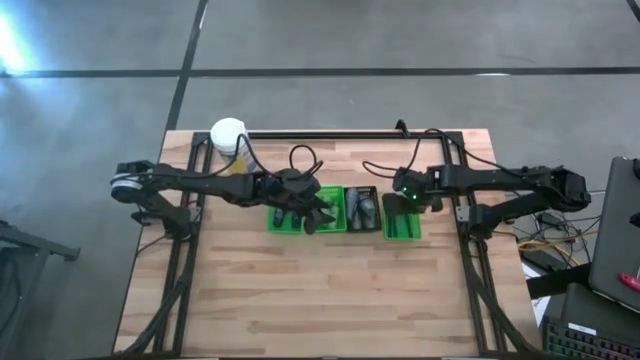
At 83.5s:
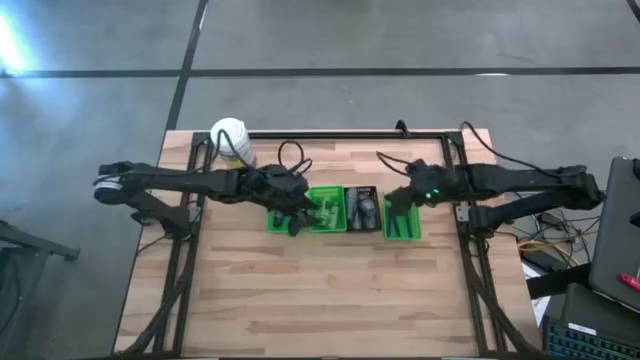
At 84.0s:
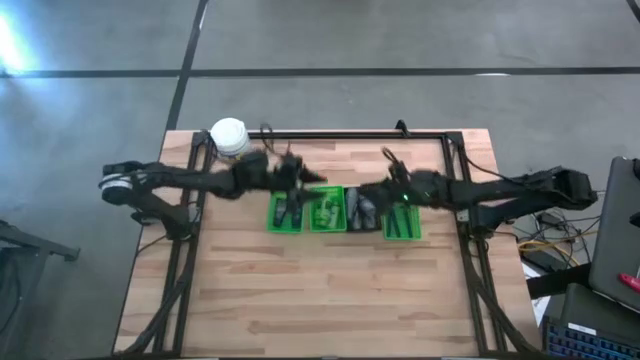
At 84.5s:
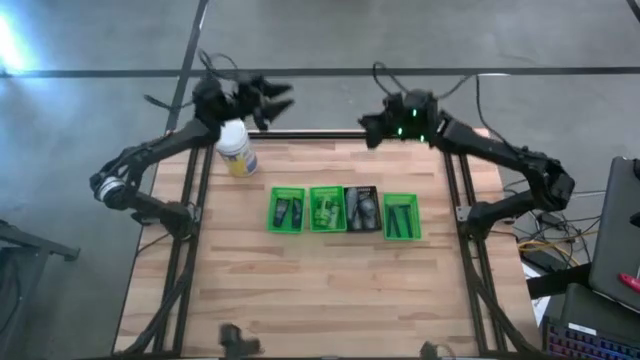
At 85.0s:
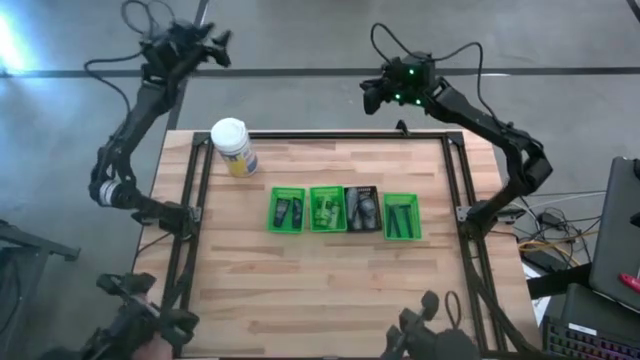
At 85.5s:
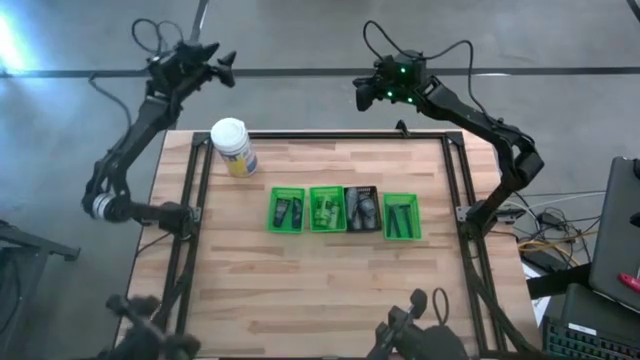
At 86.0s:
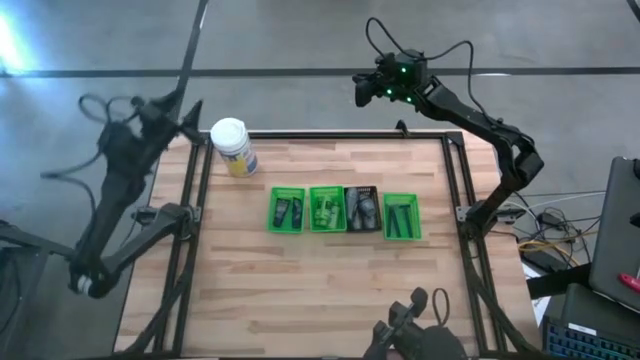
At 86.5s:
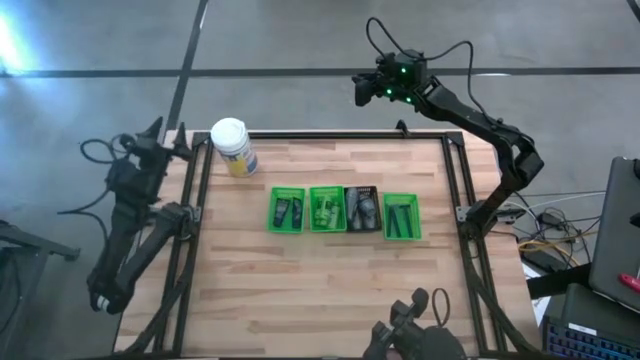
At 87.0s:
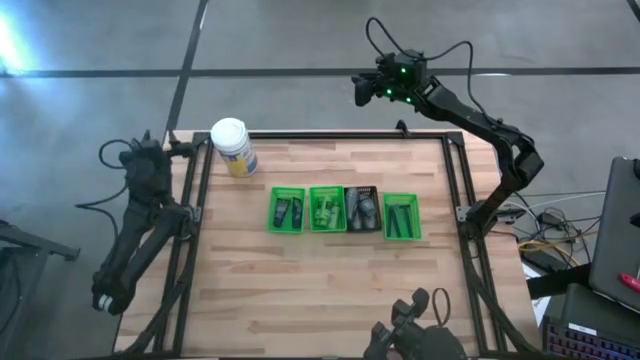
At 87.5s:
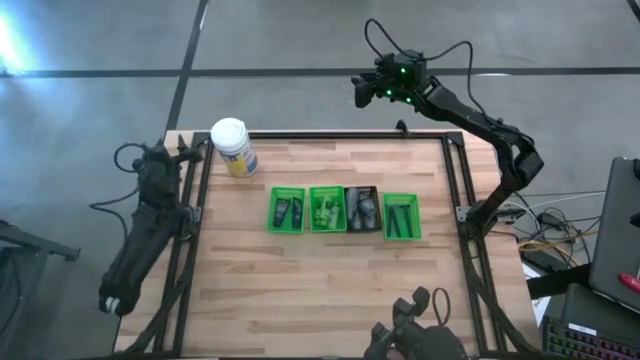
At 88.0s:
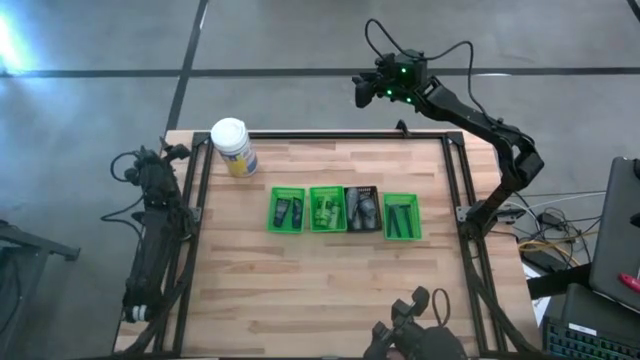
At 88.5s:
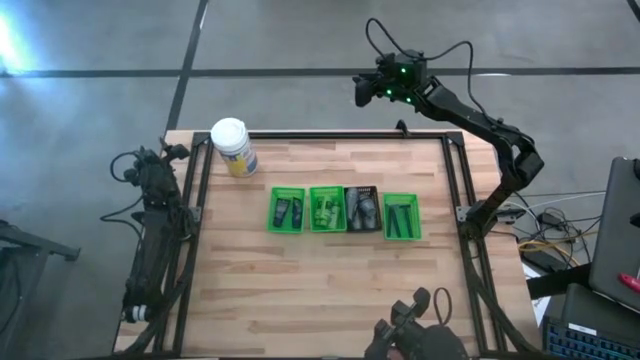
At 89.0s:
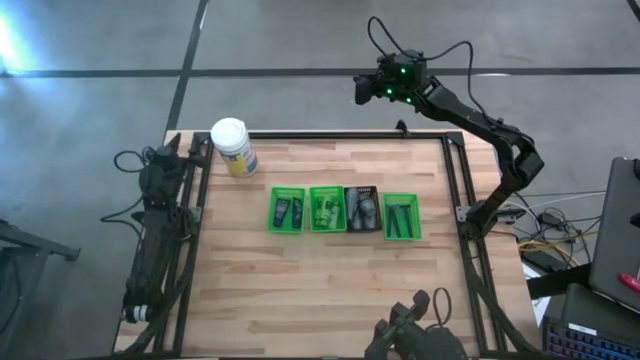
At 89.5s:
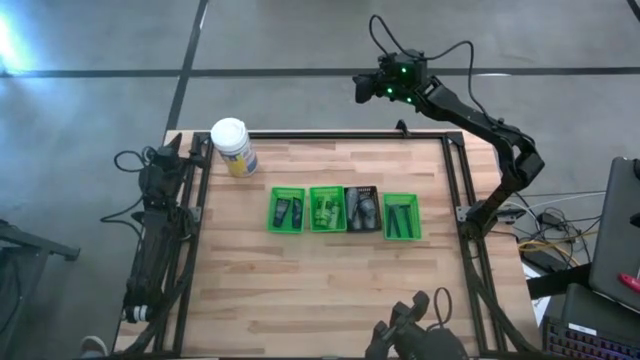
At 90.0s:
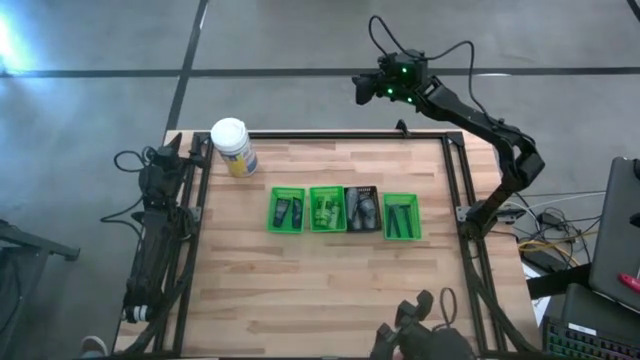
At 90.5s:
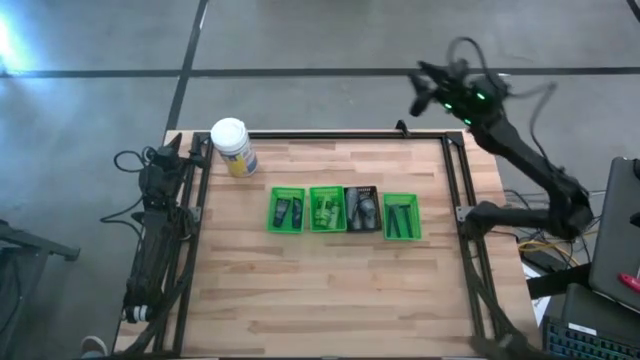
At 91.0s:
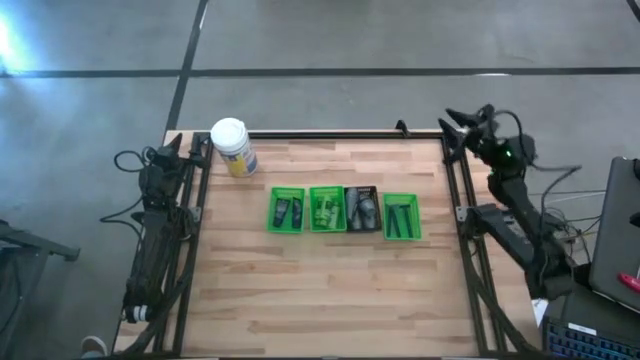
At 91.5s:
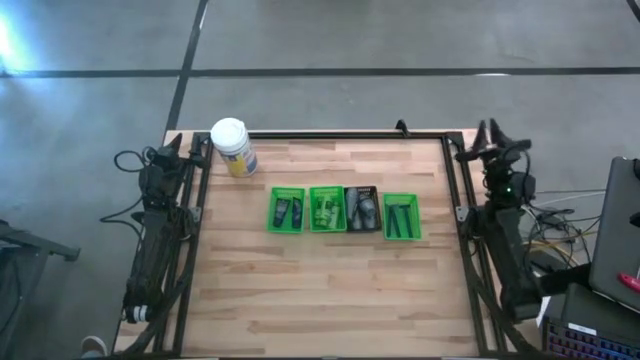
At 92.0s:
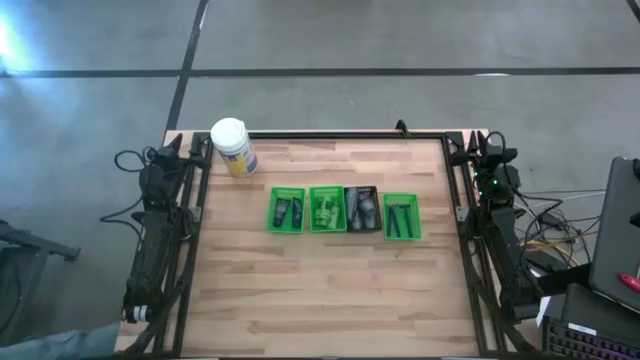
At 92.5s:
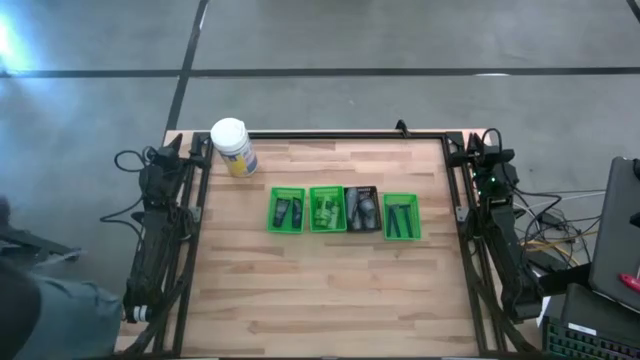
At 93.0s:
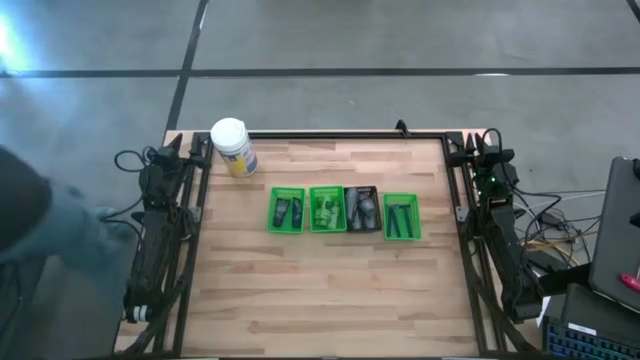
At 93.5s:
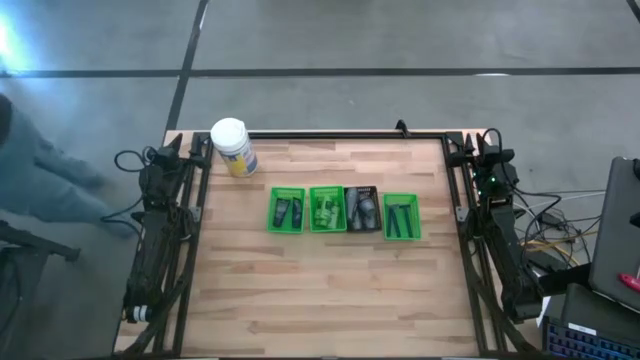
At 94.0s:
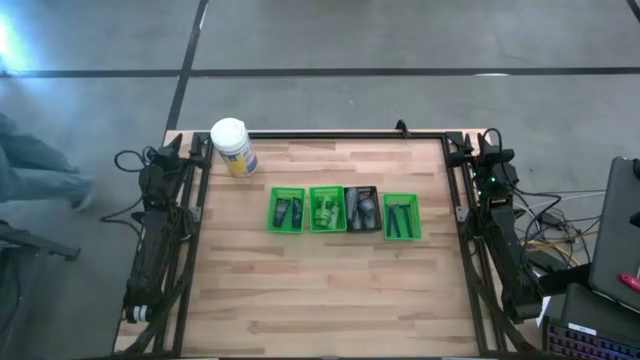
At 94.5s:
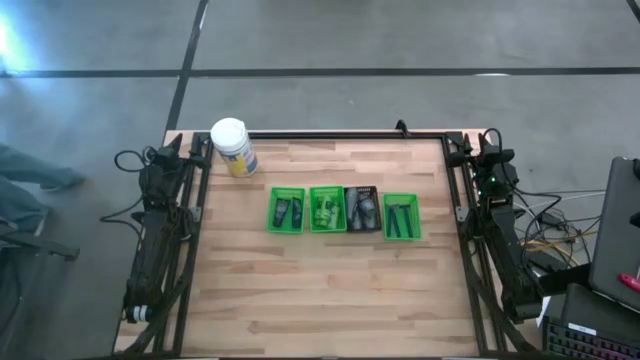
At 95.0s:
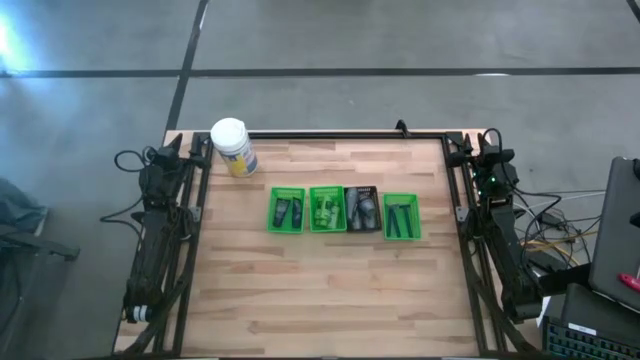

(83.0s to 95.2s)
Task: Pick & Place Travel size toiletries
Return to Home Position

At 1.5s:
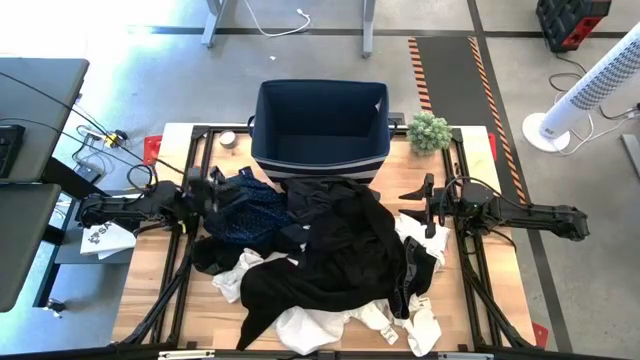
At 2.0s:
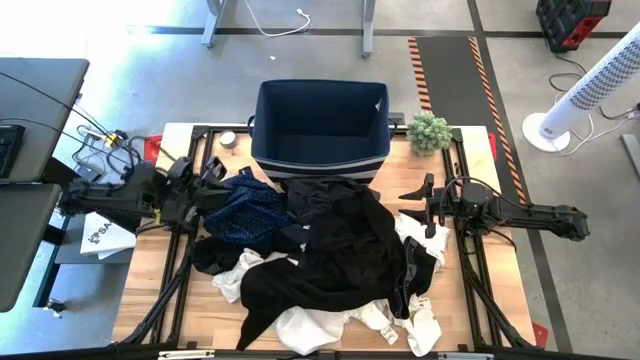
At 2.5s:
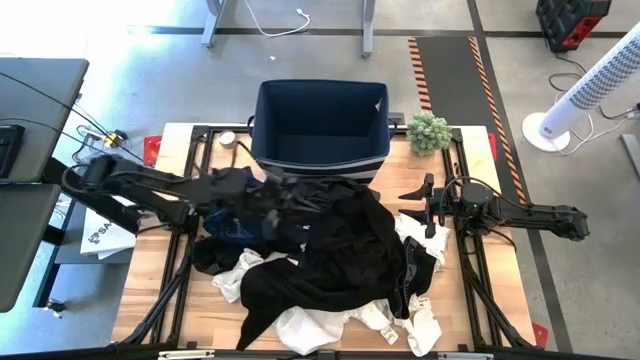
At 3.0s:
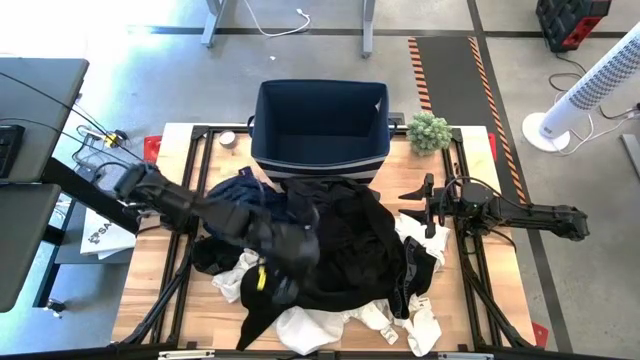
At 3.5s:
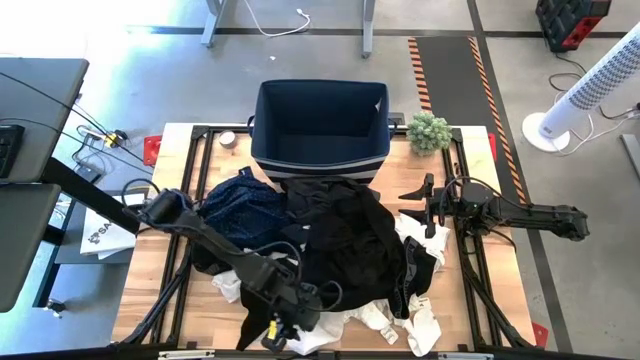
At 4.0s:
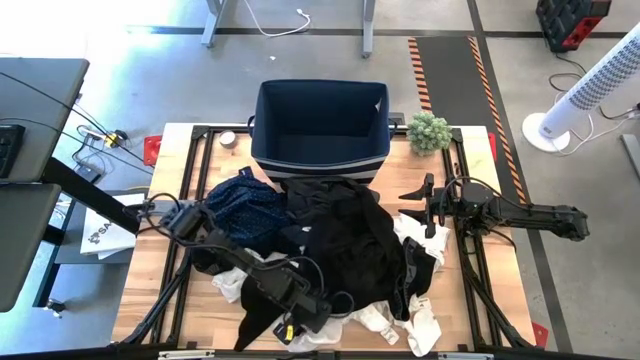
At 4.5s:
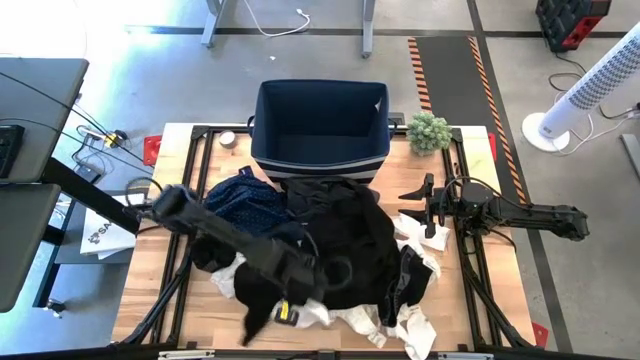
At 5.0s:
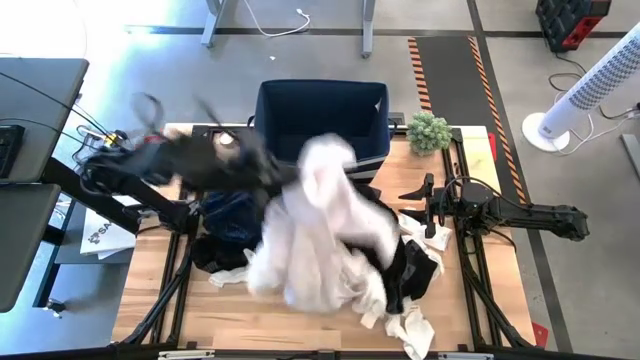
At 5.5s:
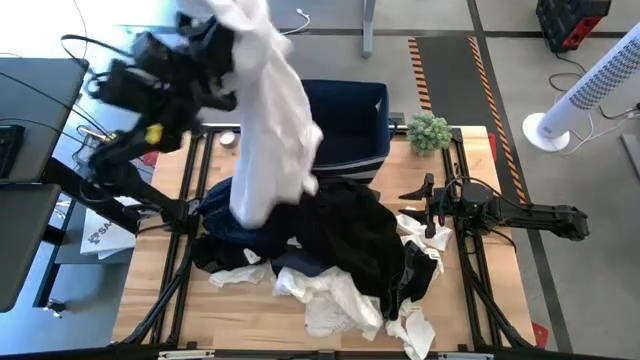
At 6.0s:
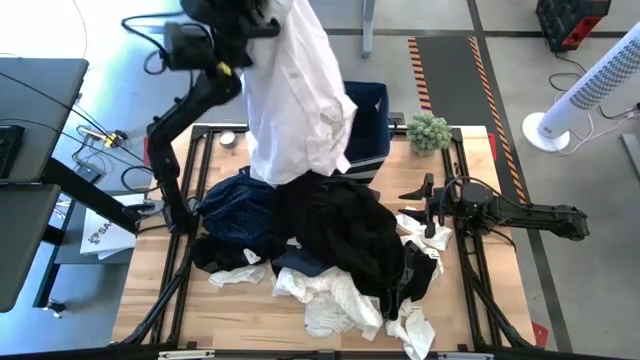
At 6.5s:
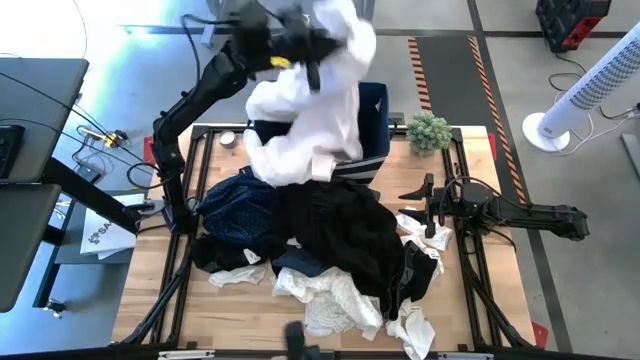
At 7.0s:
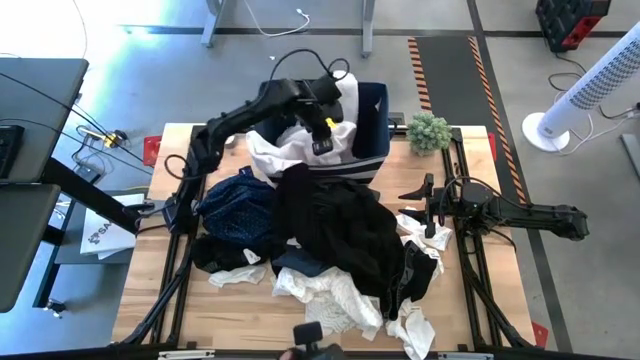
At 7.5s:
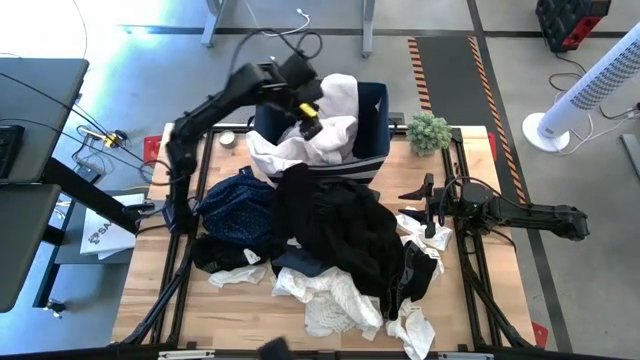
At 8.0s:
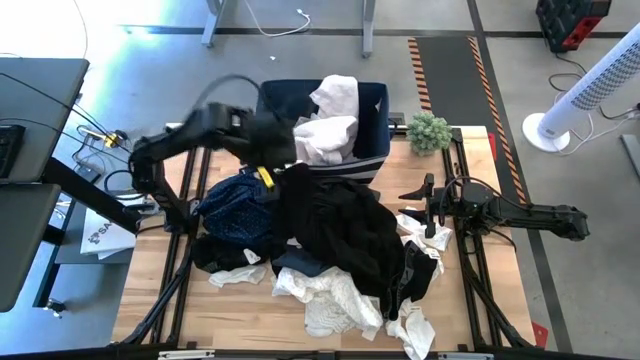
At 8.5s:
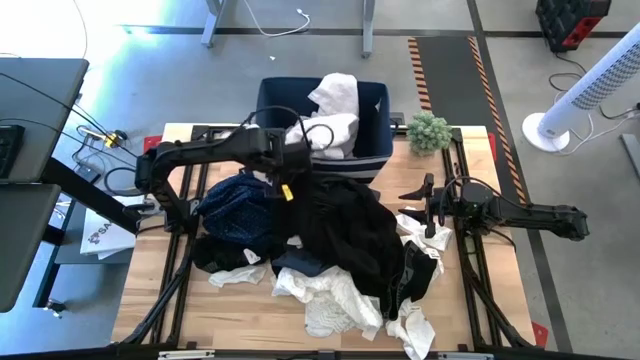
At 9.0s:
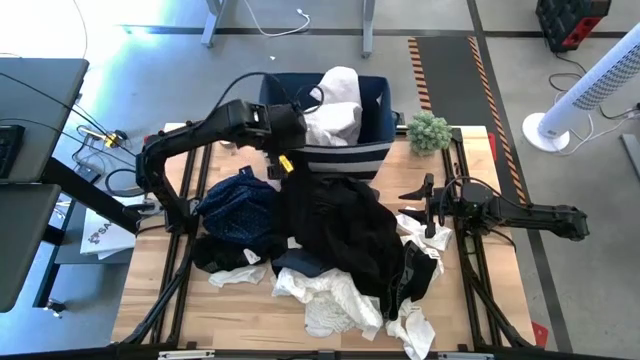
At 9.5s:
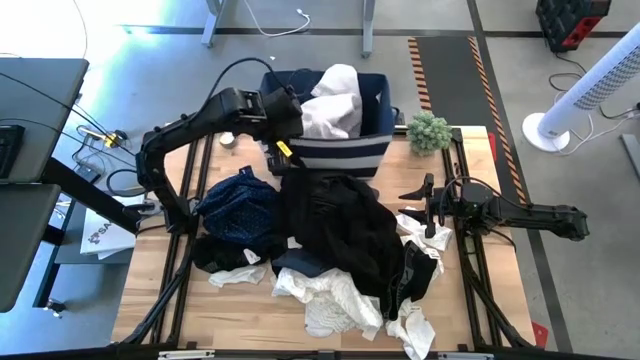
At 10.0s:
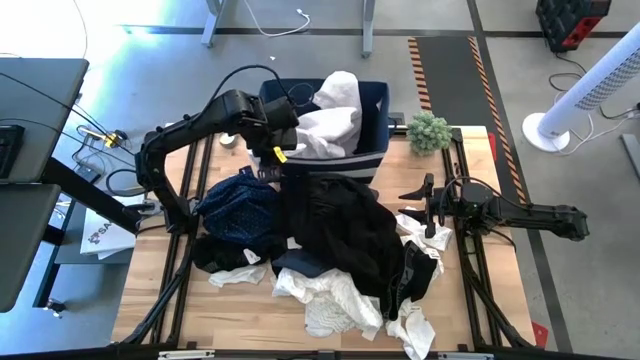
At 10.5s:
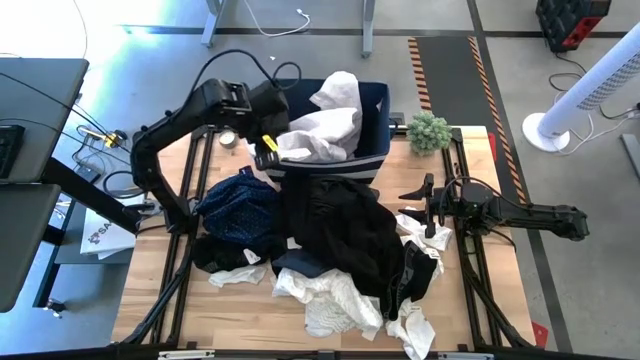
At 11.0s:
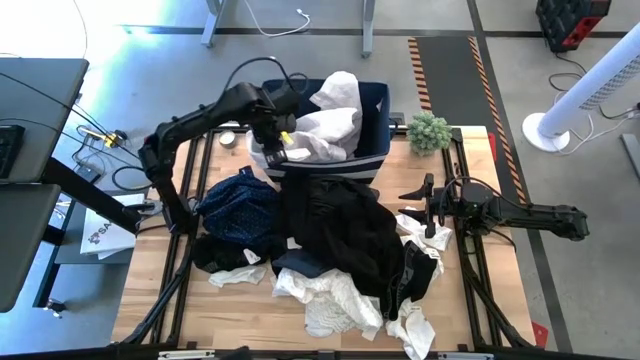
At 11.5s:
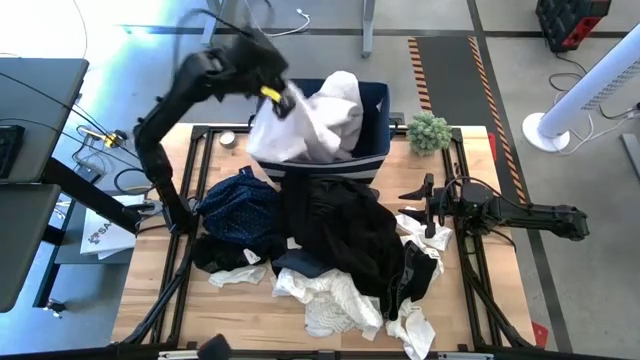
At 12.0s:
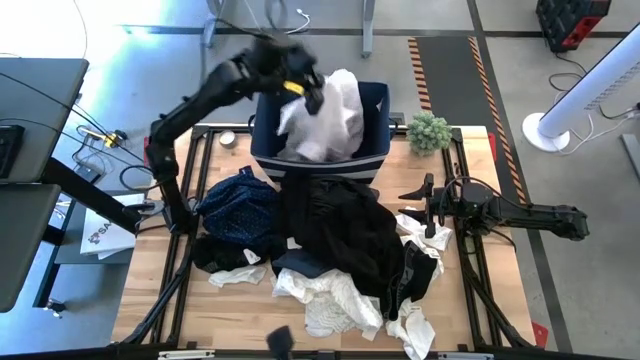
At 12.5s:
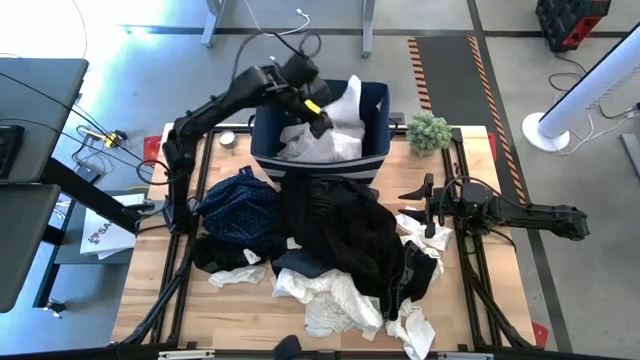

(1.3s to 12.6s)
Task: Sort clothes
Put the white shirt into the blue bin
